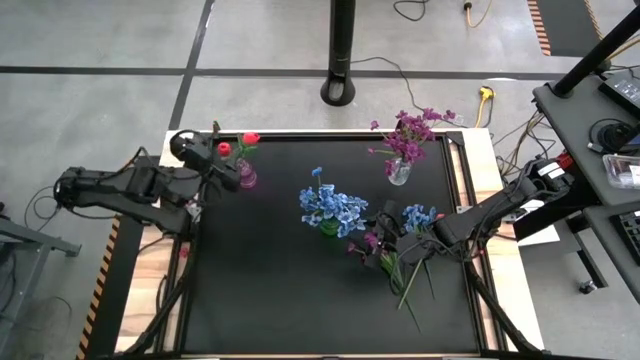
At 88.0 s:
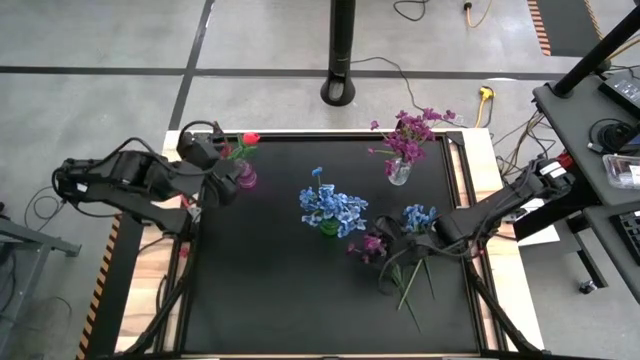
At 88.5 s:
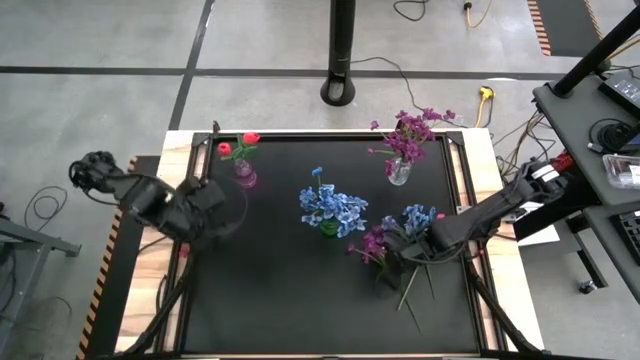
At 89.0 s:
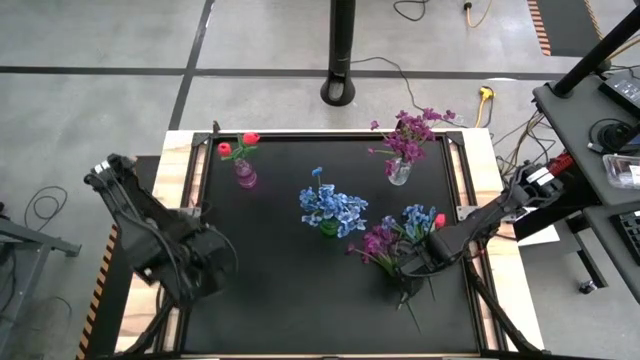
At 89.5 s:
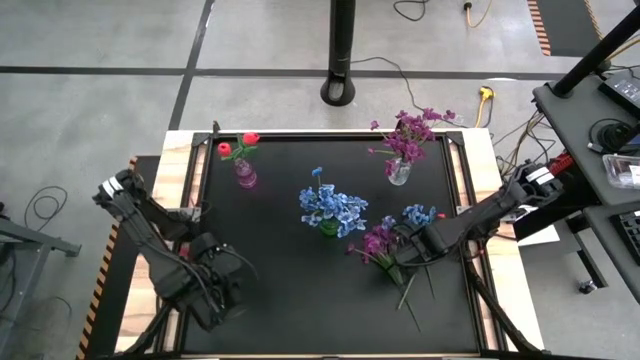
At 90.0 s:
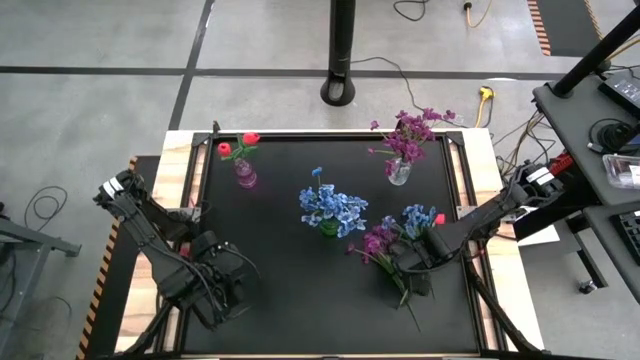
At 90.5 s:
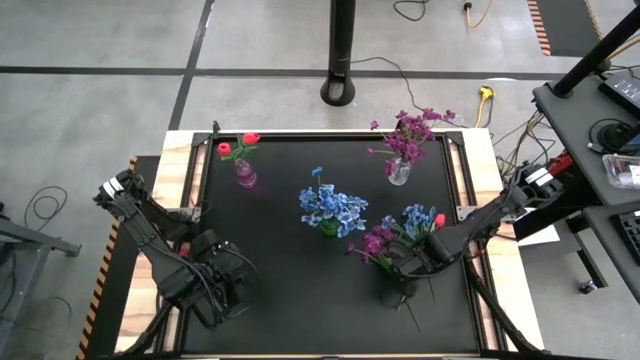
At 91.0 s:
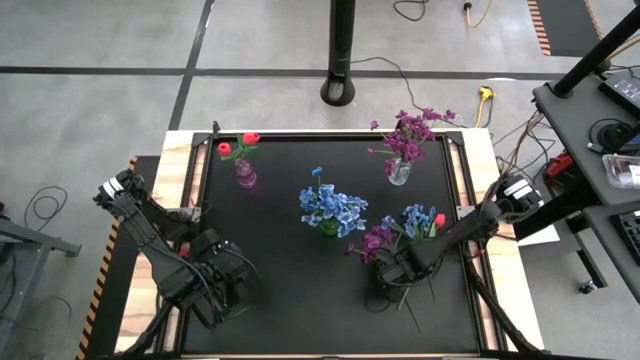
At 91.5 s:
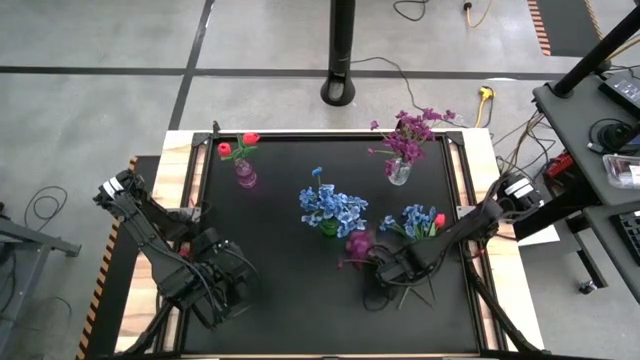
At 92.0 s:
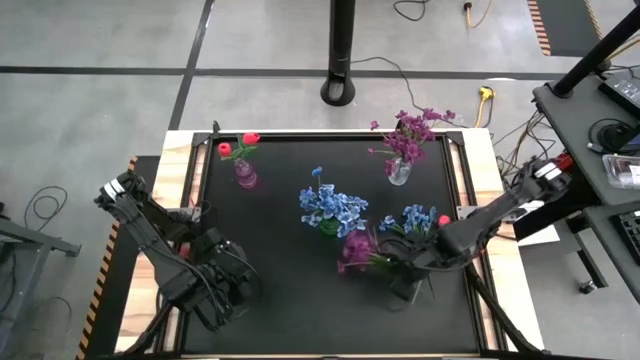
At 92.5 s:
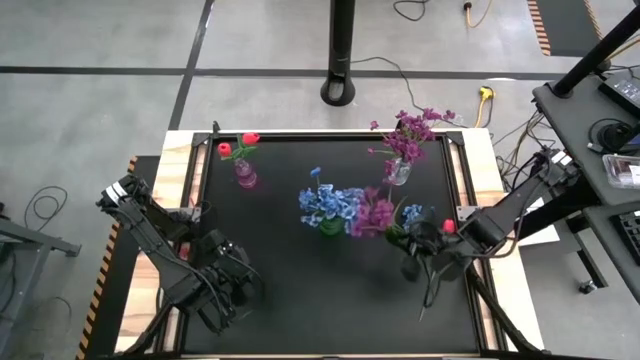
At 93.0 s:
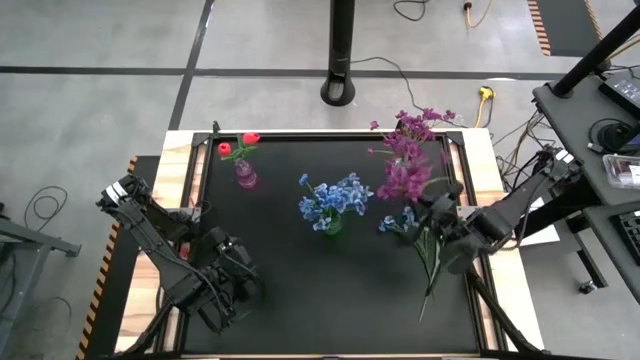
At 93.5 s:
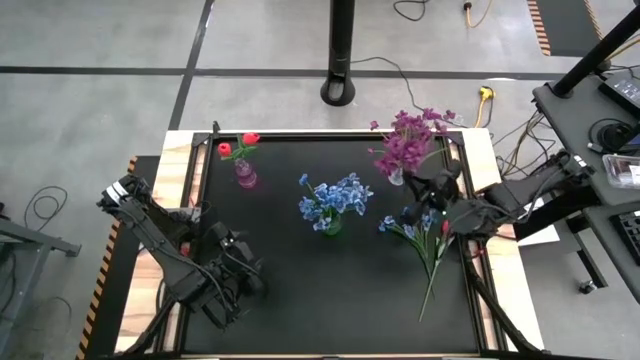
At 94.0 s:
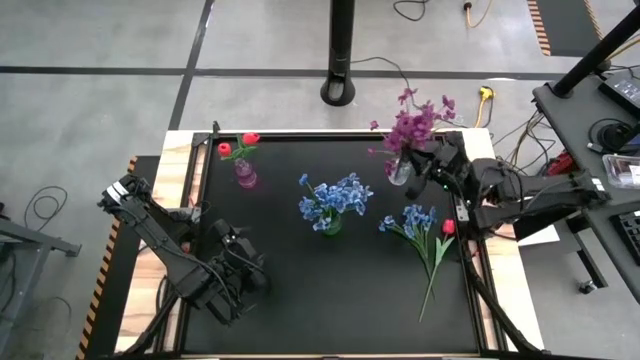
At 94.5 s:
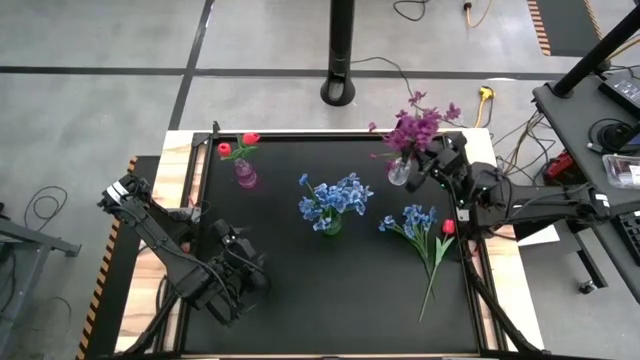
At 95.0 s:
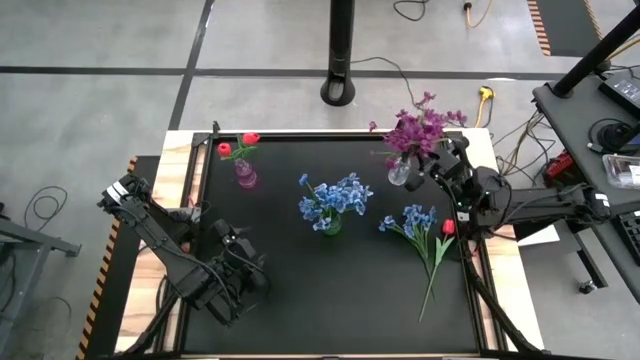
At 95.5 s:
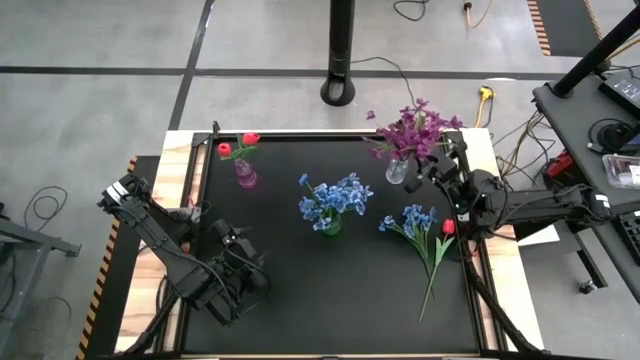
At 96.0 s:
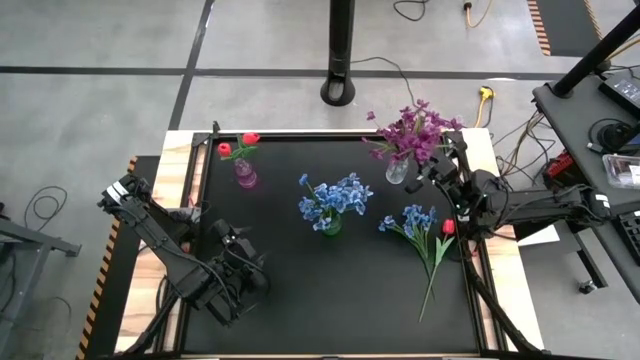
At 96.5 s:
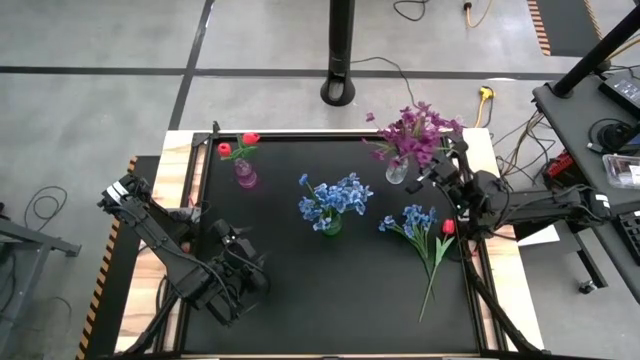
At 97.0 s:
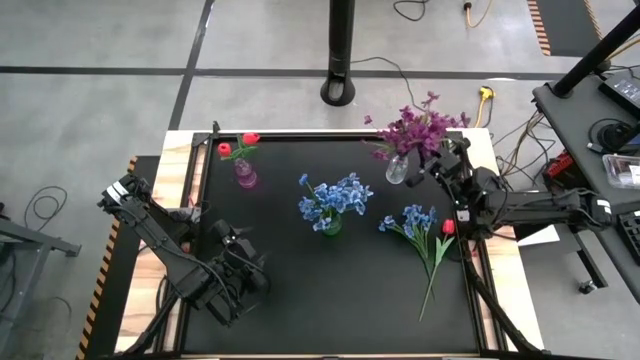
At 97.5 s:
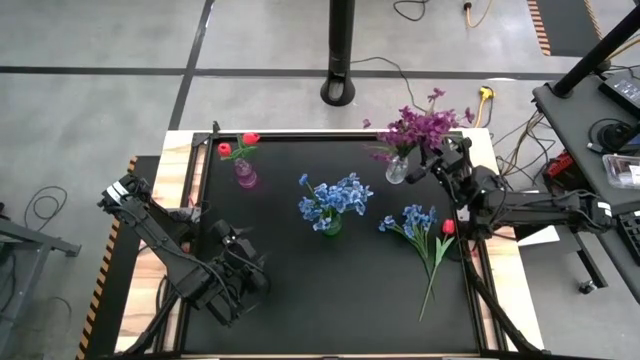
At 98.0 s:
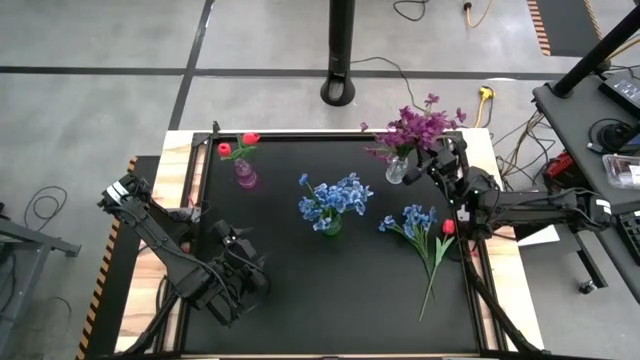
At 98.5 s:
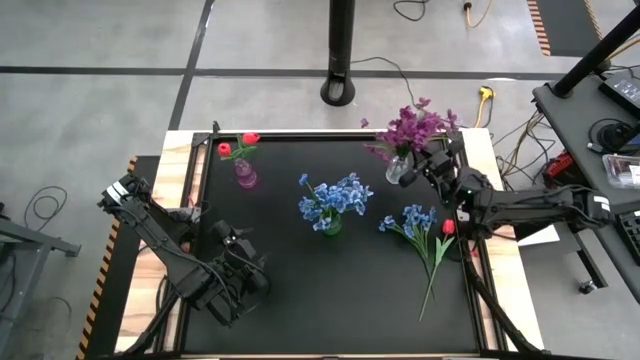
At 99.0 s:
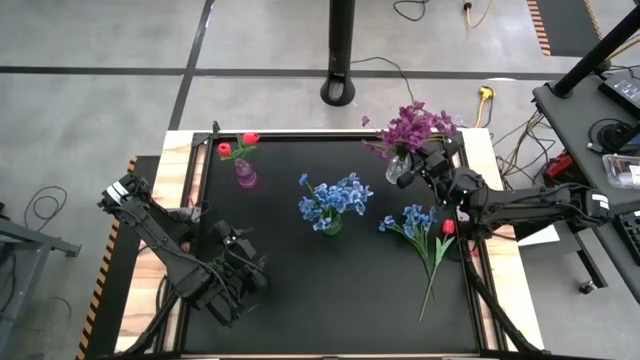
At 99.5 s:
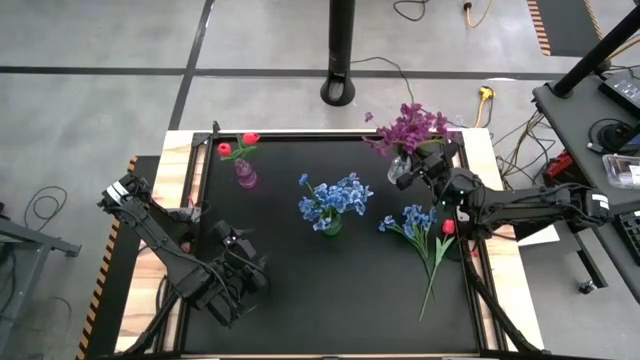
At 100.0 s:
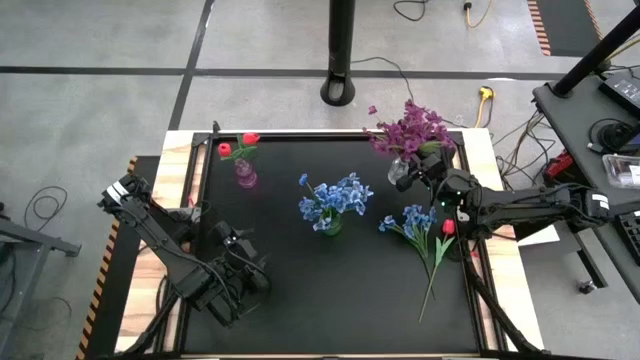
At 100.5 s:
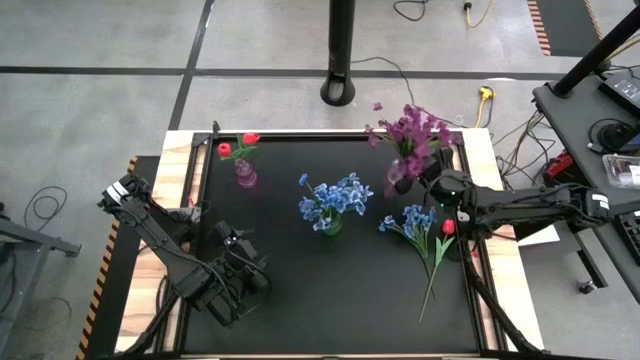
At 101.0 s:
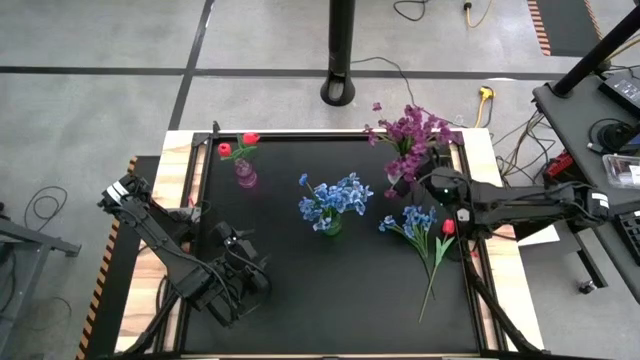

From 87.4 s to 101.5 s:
Task: Sort flowers into vase by color
Put the violet flowers into the transparent vase

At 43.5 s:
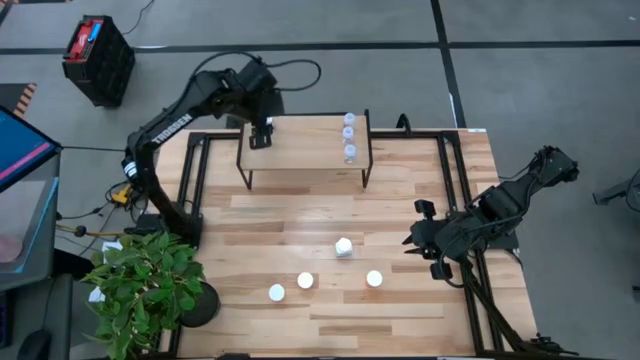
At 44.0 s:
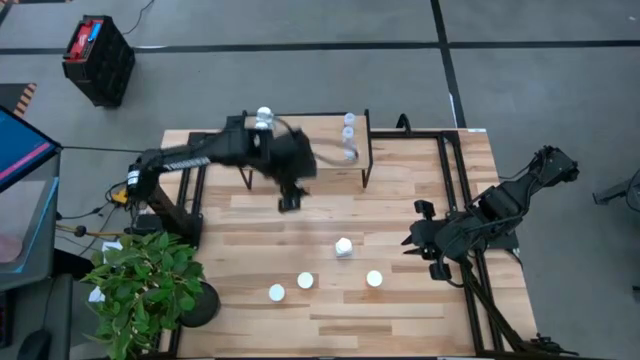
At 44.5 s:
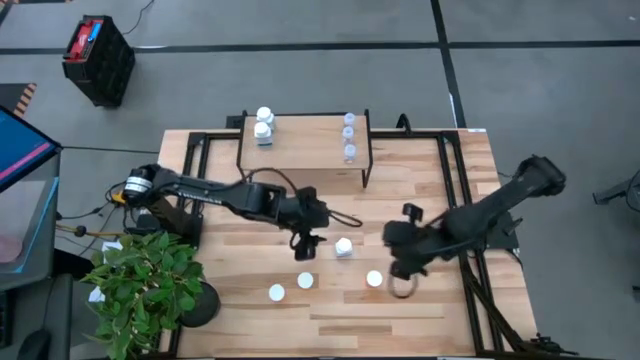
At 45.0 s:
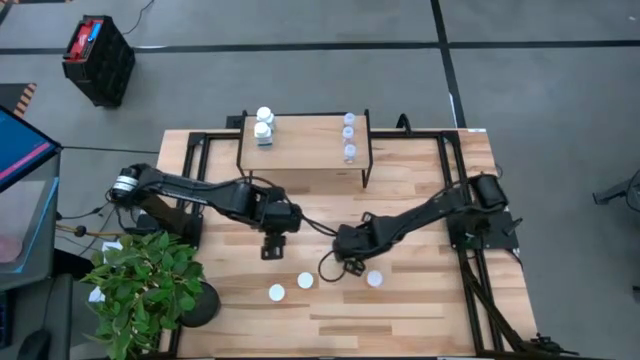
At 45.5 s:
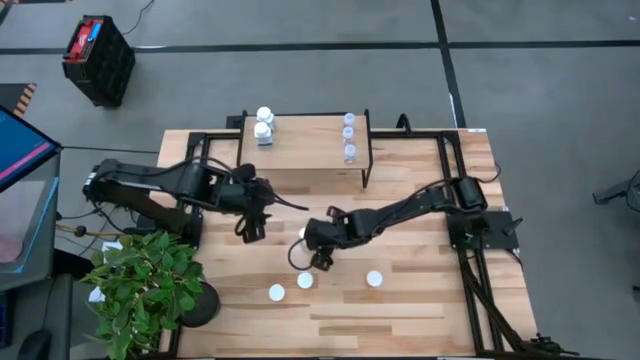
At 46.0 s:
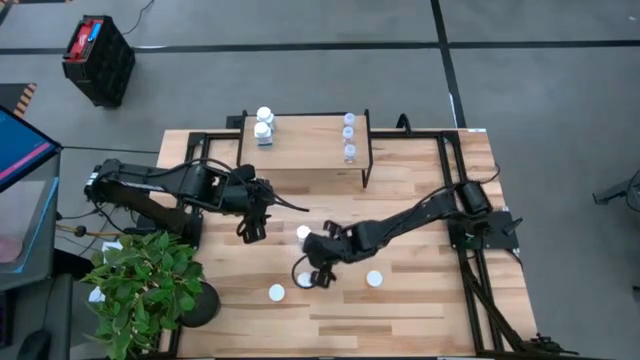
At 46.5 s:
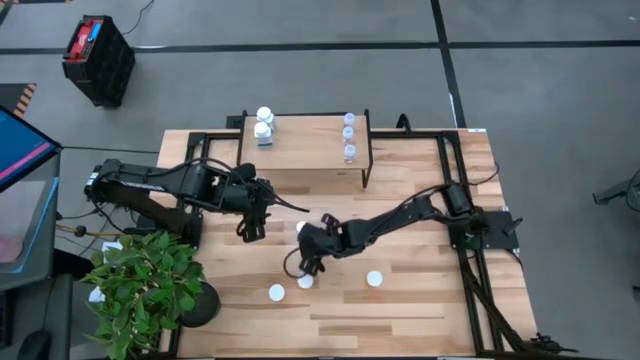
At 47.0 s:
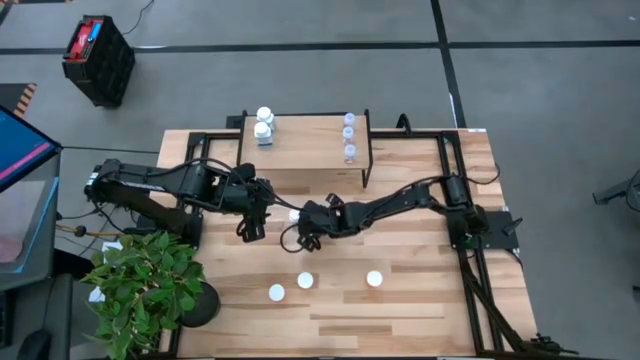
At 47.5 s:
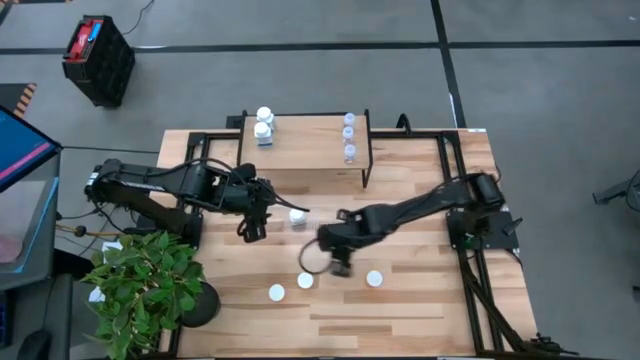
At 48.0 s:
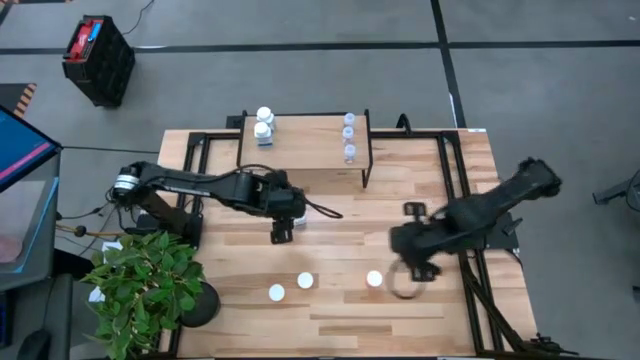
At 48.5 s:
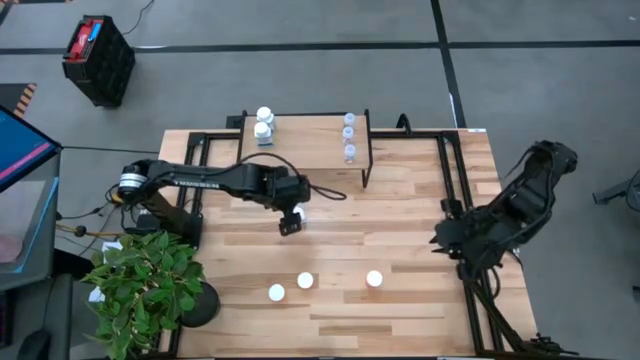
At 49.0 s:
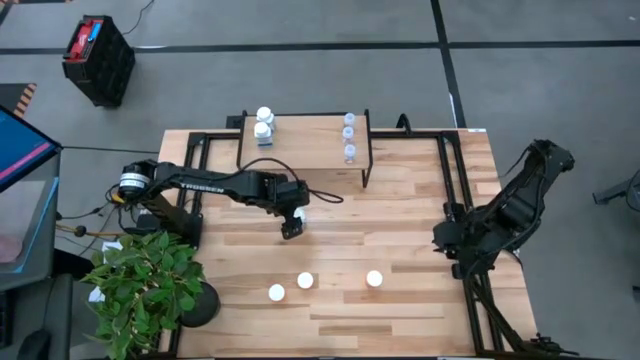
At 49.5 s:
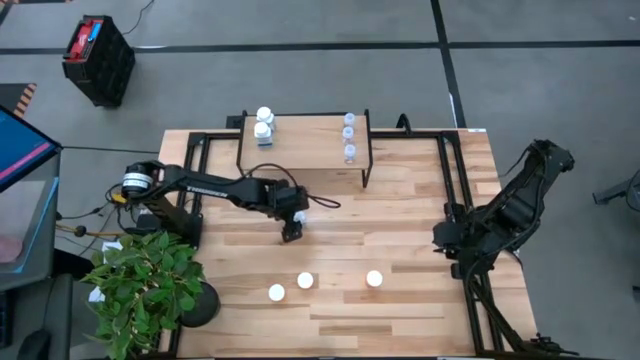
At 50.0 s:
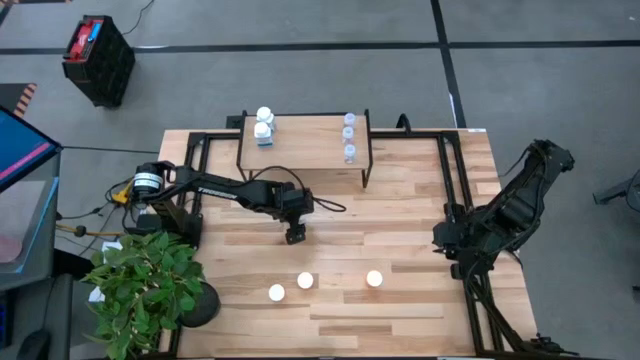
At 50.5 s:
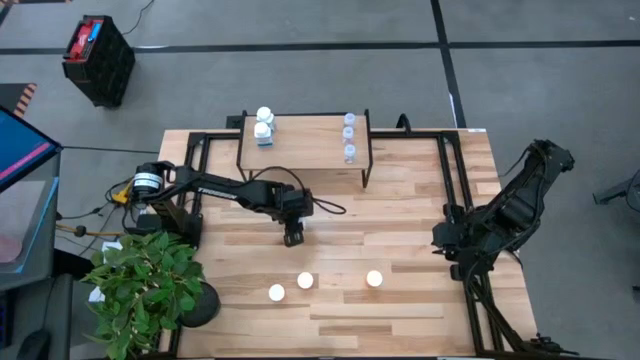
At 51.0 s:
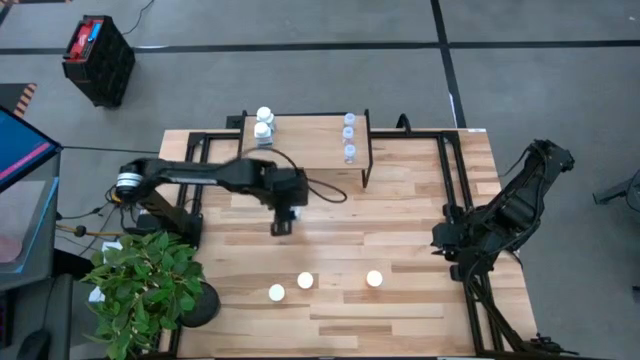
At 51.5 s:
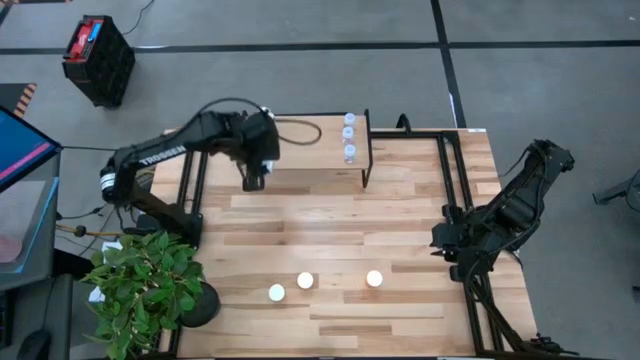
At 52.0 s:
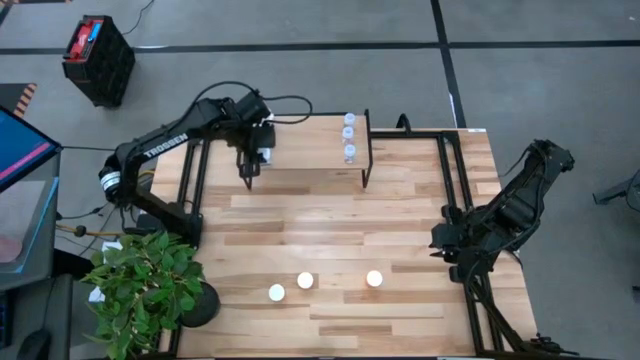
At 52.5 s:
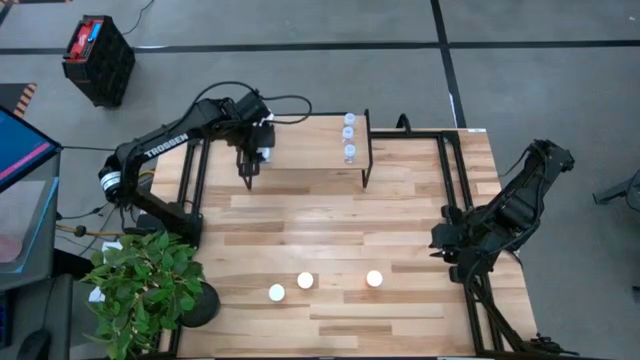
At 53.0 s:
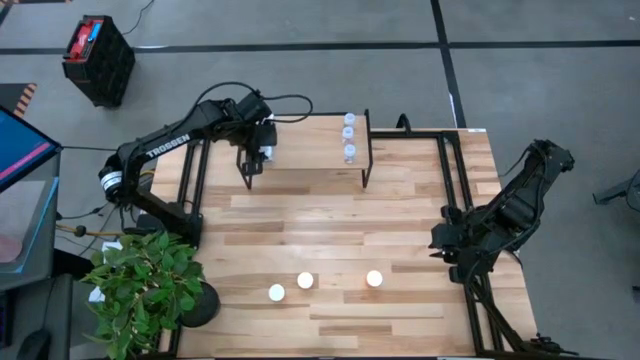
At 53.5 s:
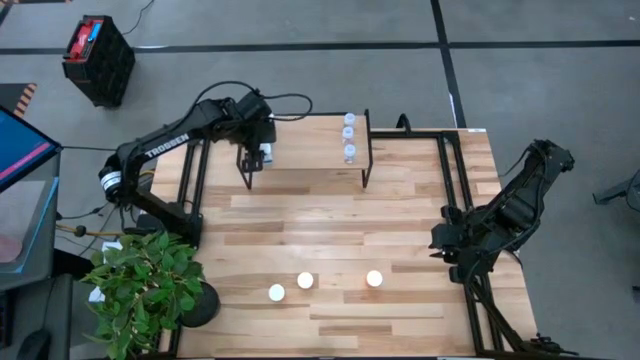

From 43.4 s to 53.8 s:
Task: Pick and place medicine bottles onto shelf by color
Put the white pill bottle on the shelf aligned with the other white pill bottles
